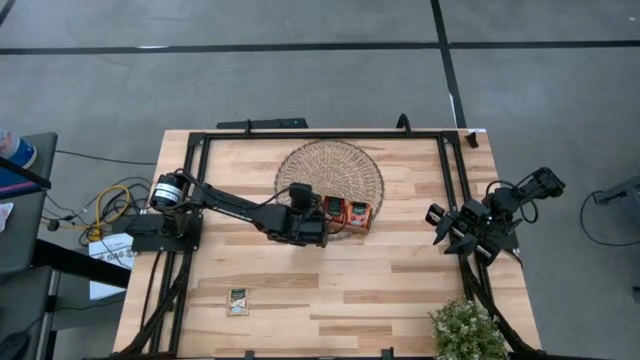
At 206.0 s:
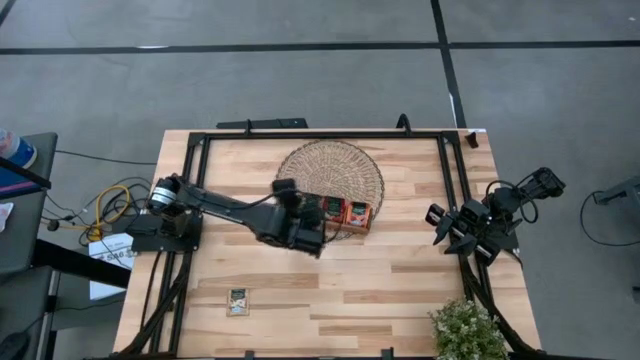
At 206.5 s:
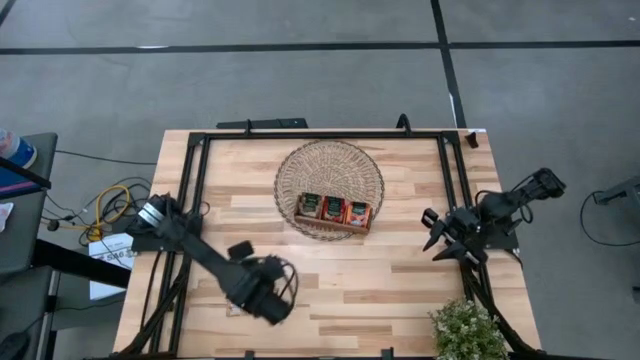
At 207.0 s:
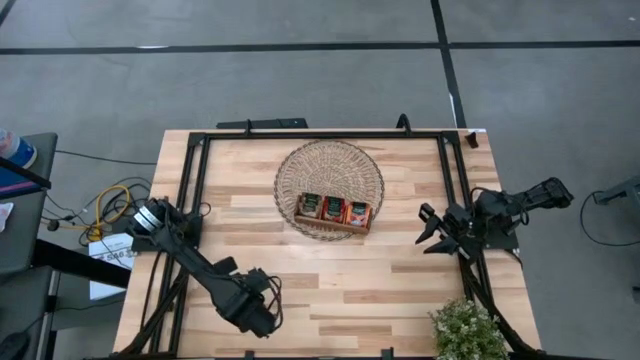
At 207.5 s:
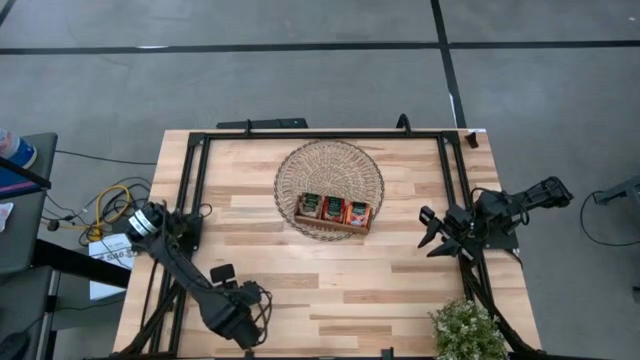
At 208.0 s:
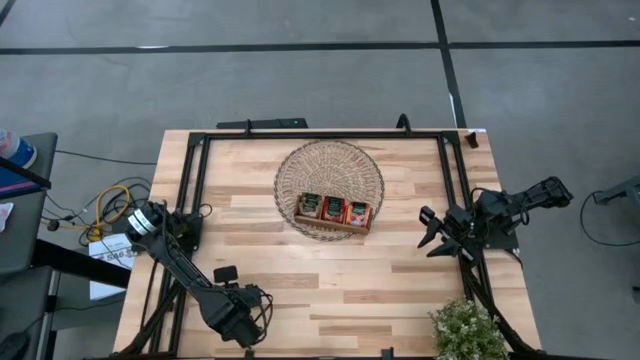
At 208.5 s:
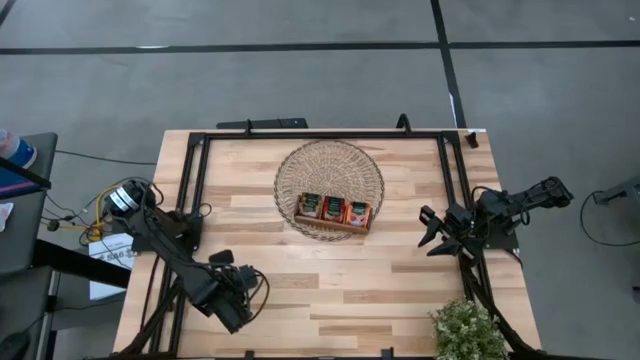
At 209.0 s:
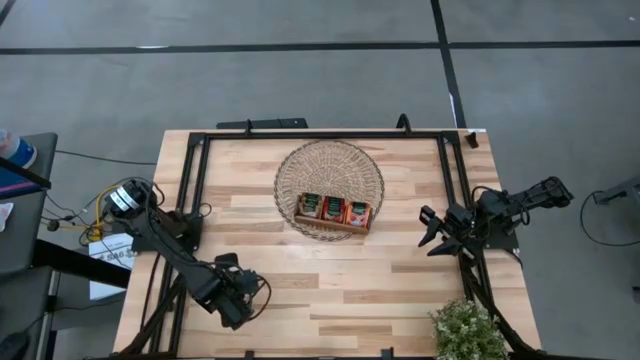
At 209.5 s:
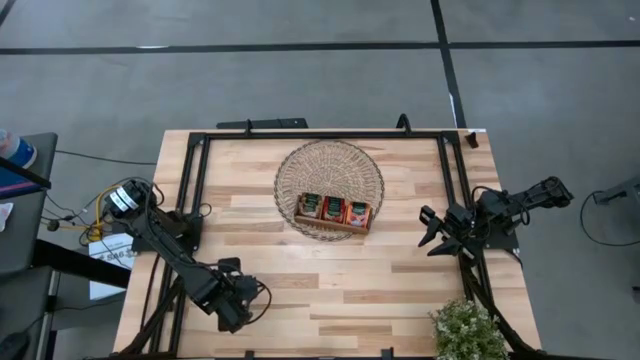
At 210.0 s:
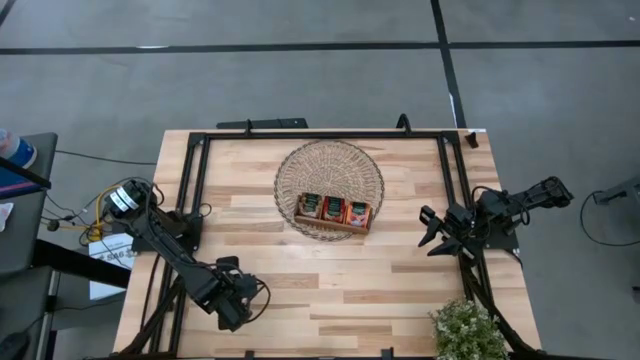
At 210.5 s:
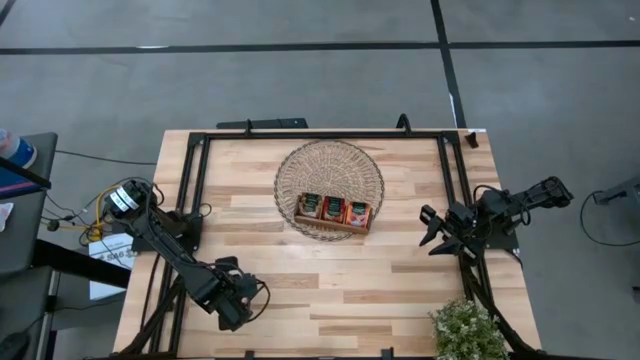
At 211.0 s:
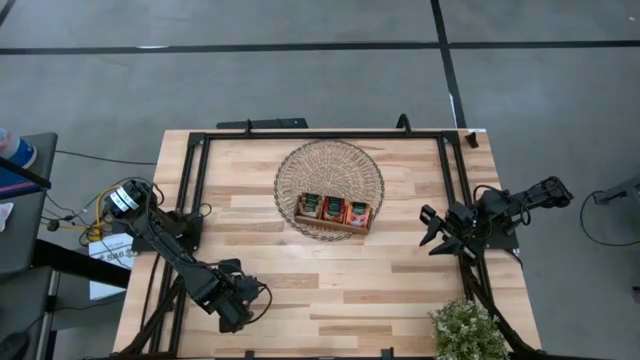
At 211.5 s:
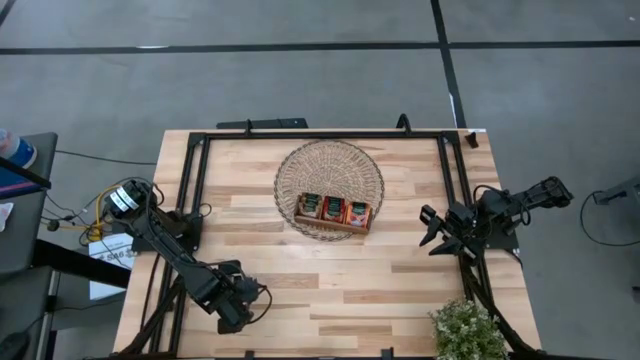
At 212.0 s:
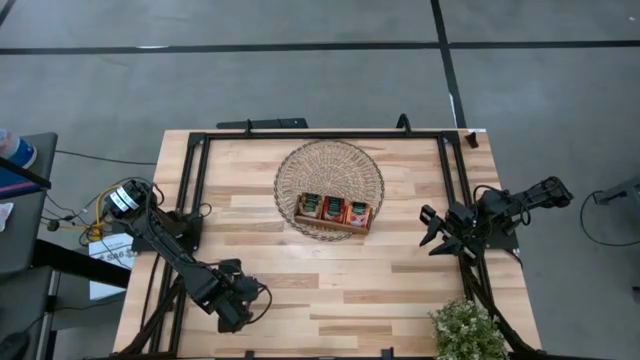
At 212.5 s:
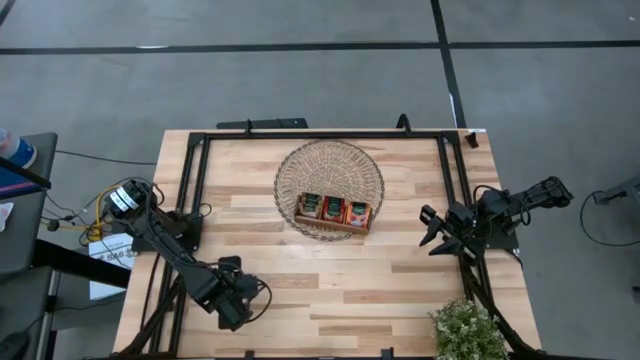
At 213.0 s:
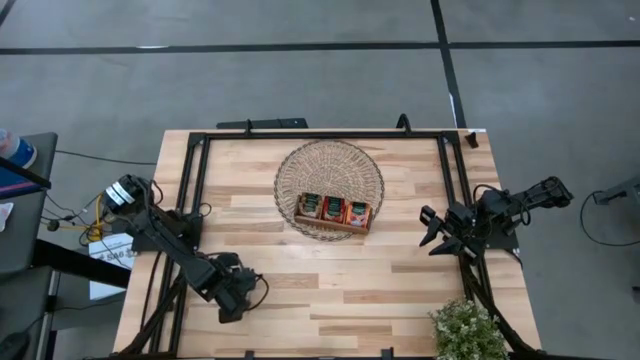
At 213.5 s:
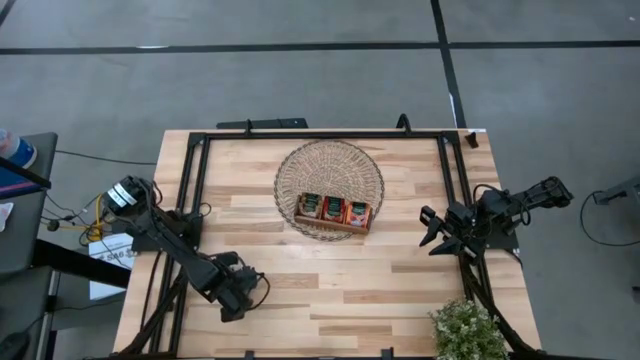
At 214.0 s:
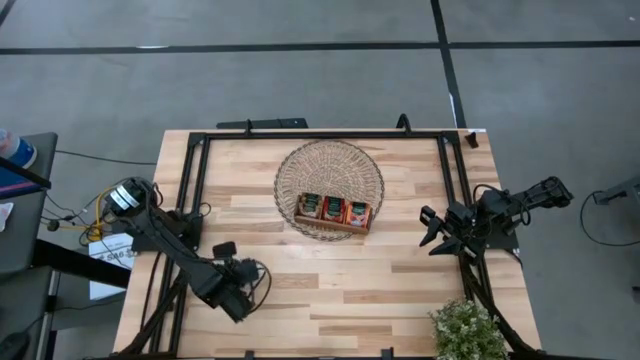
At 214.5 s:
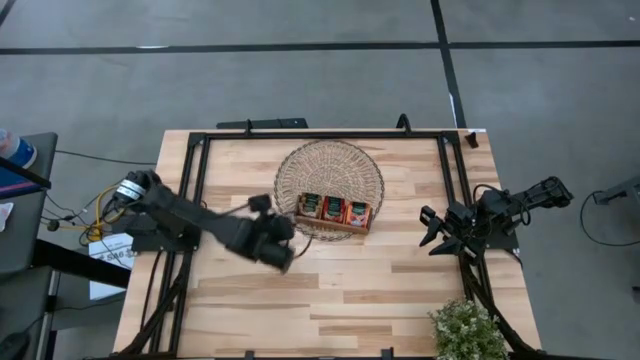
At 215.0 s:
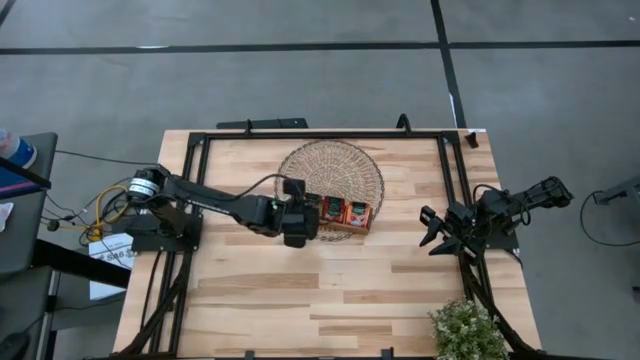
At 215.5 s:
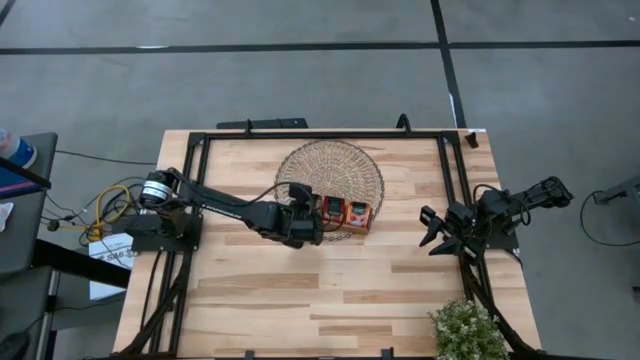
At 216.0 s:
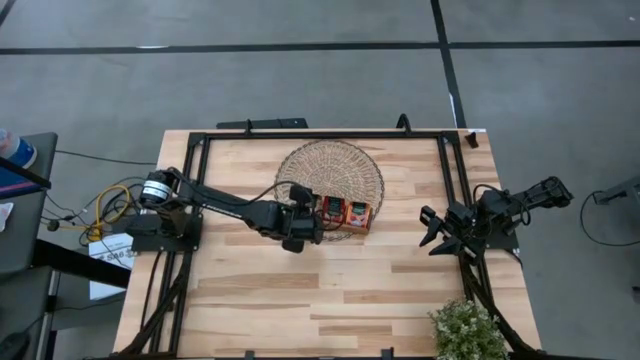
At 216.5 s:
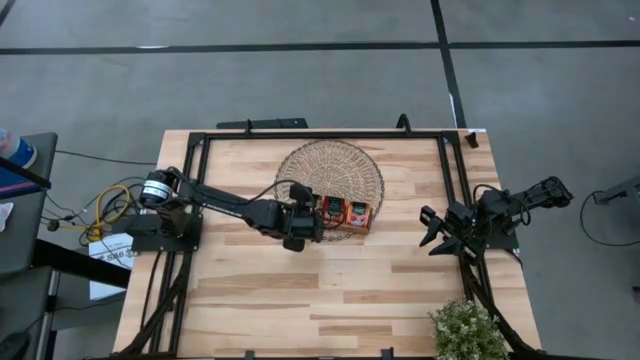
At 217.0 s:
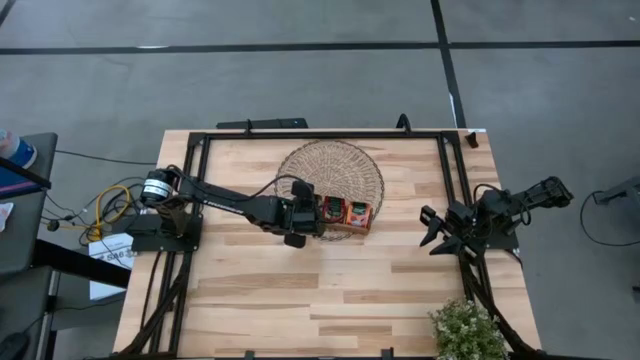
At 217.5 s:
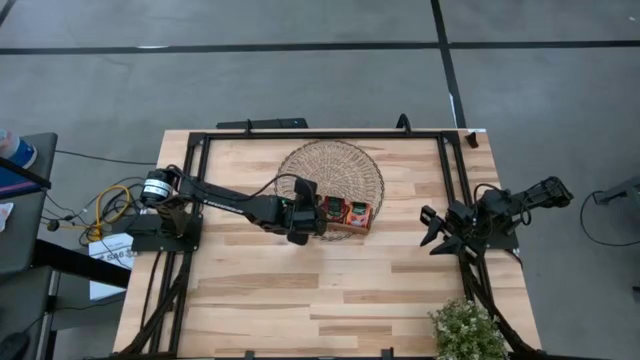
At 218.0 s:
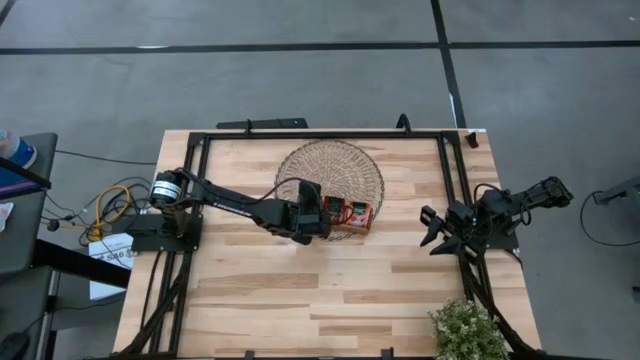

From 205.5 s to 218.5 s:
Task: Pick & Place Tea
Put the brown tea bag into the left section of the wooden organizer

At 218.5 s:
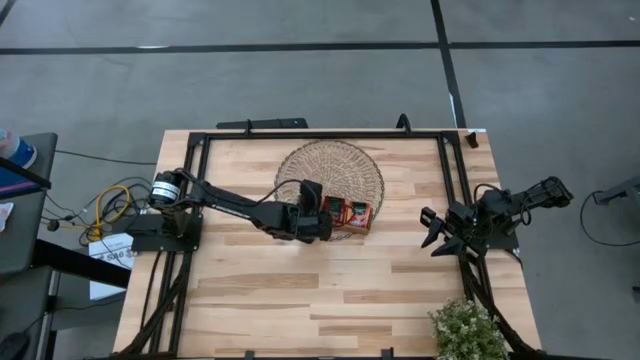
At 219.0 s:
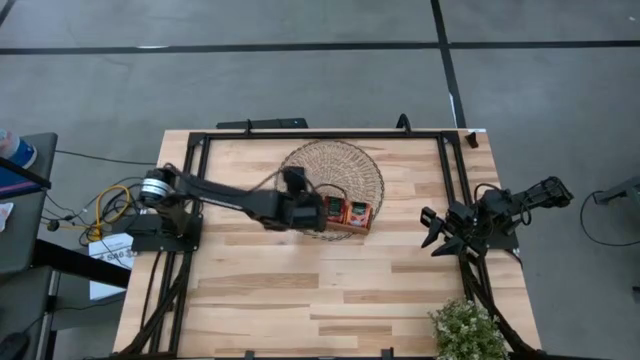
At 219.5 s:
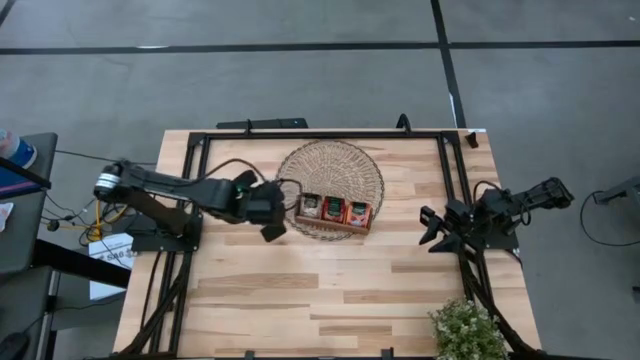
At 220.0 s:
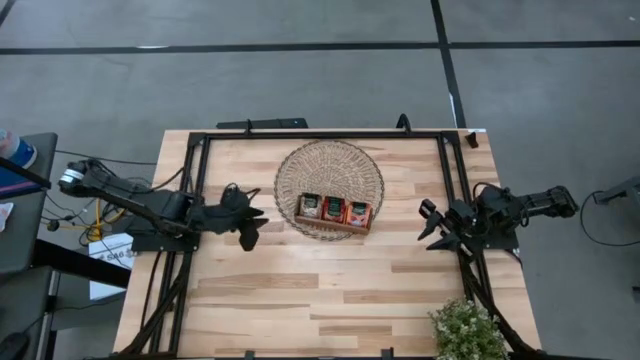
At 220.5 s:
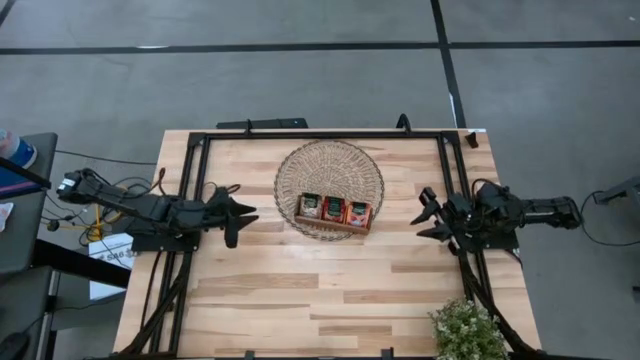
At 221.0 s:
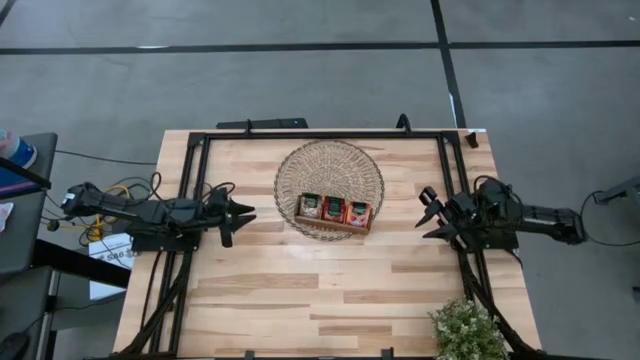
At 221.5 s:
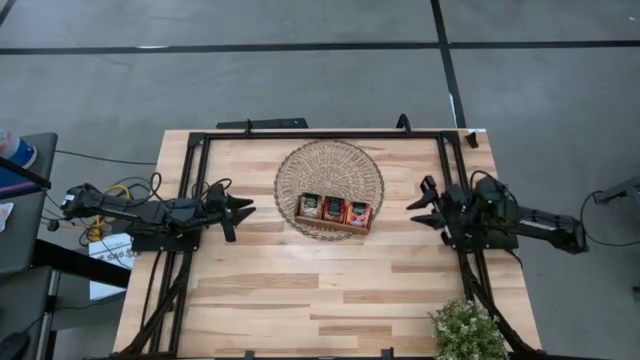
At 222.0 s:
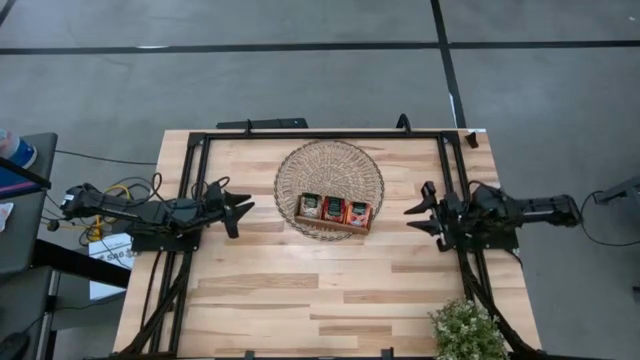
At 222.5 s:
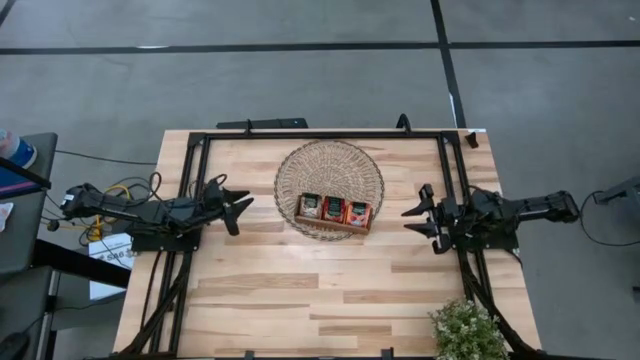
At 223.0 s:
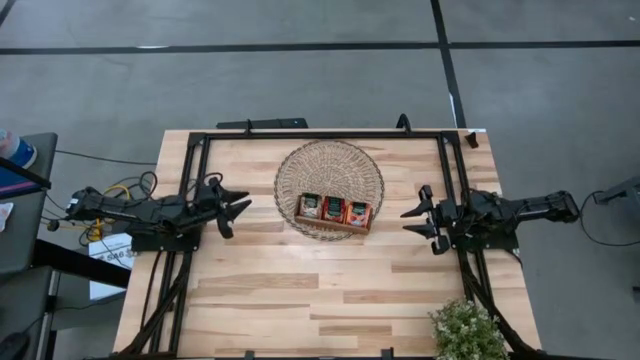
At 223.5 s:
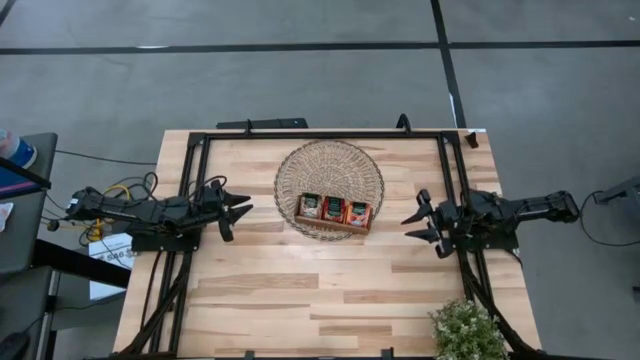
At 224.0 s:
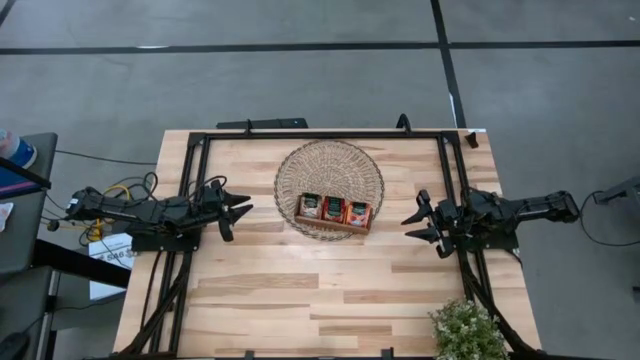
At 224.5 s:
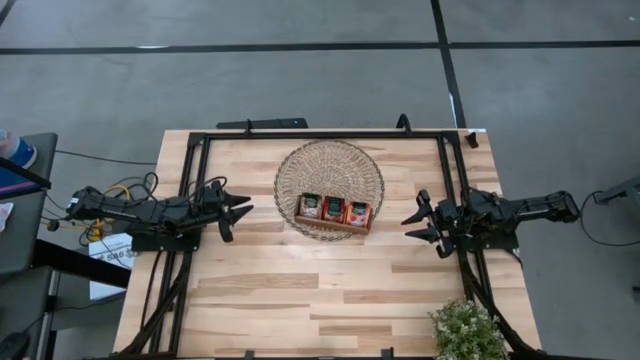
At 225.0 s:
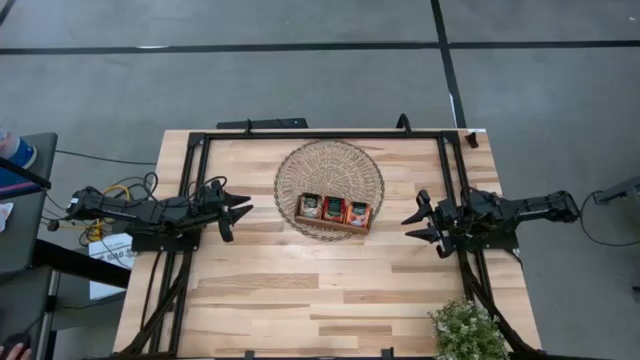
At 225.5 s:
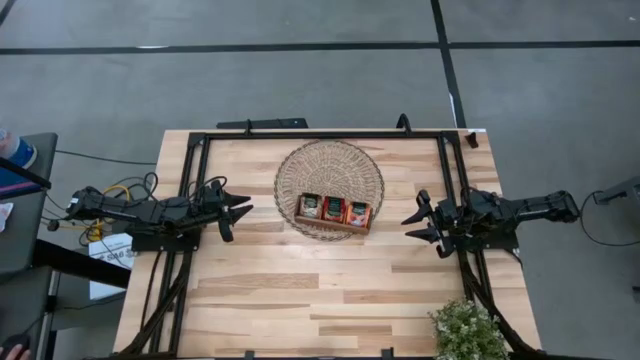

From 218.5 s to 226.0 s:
Return to Home Position
